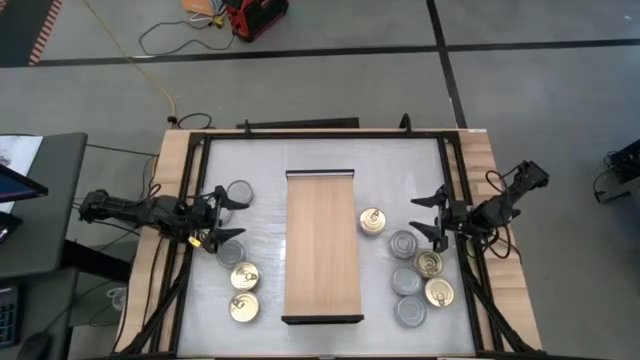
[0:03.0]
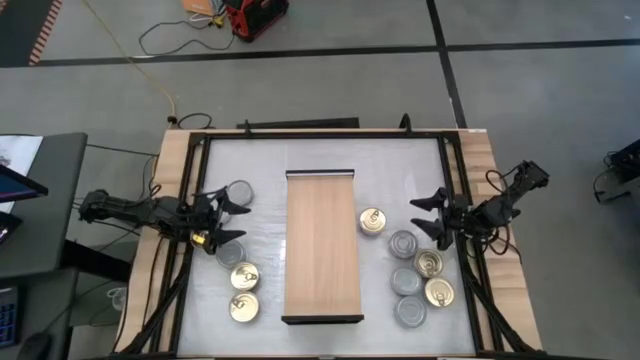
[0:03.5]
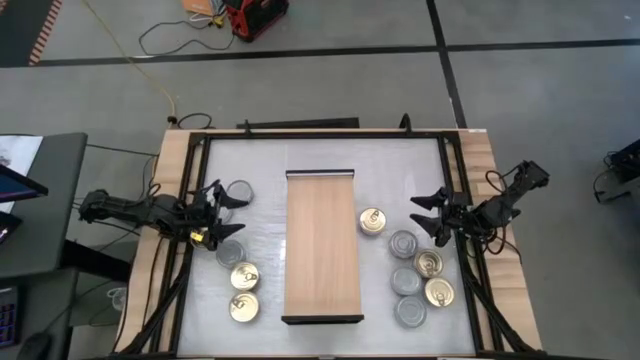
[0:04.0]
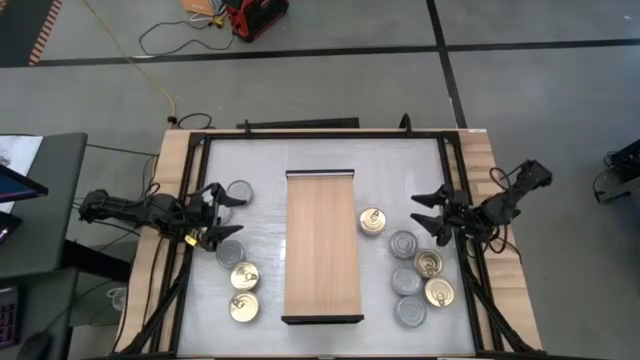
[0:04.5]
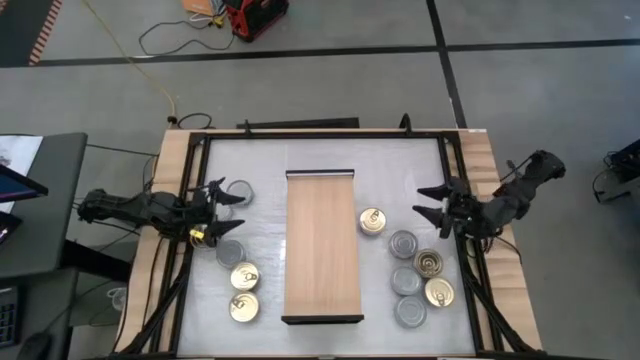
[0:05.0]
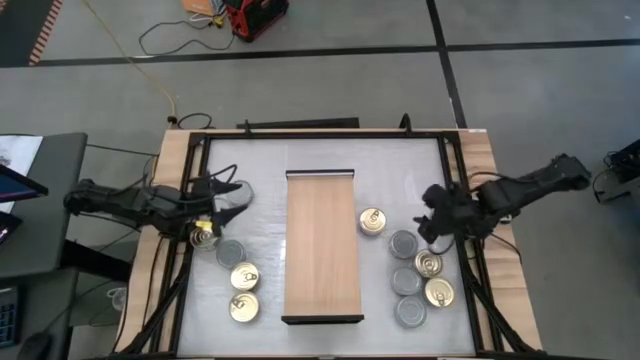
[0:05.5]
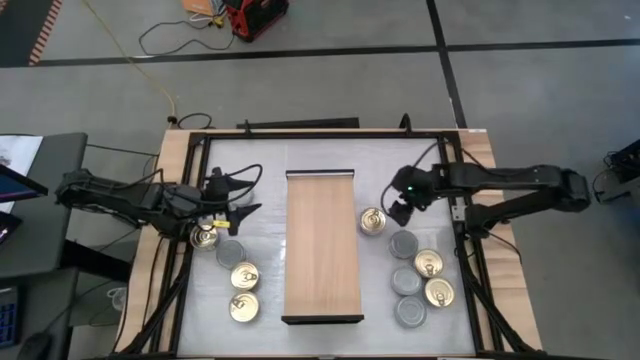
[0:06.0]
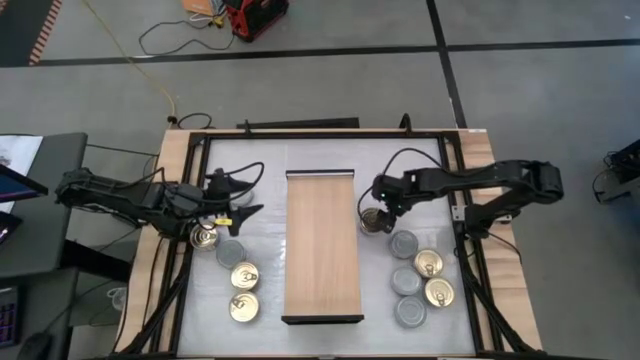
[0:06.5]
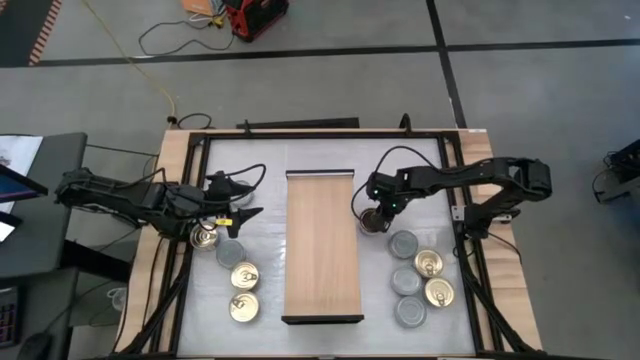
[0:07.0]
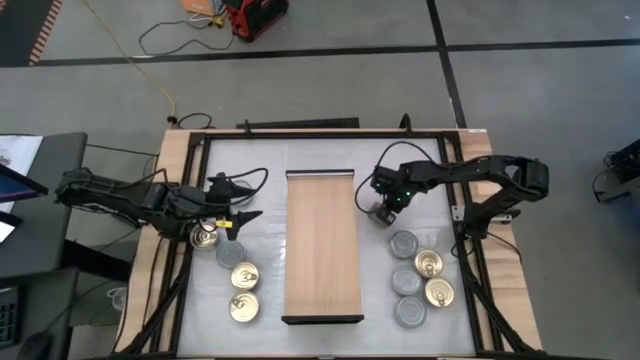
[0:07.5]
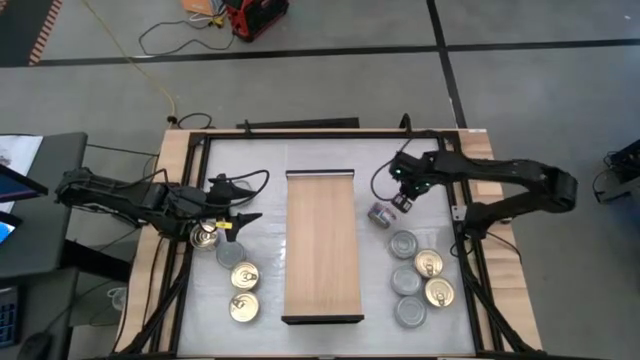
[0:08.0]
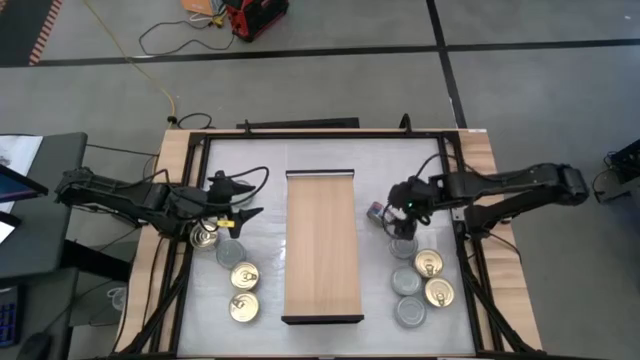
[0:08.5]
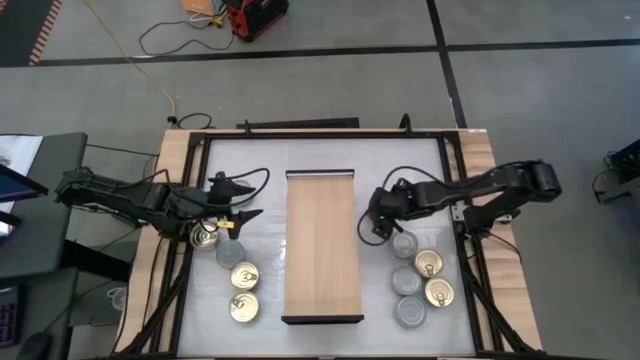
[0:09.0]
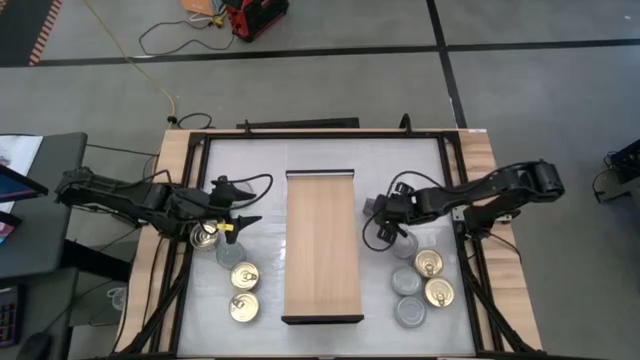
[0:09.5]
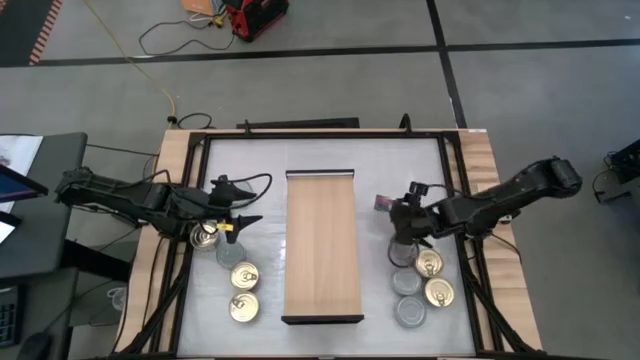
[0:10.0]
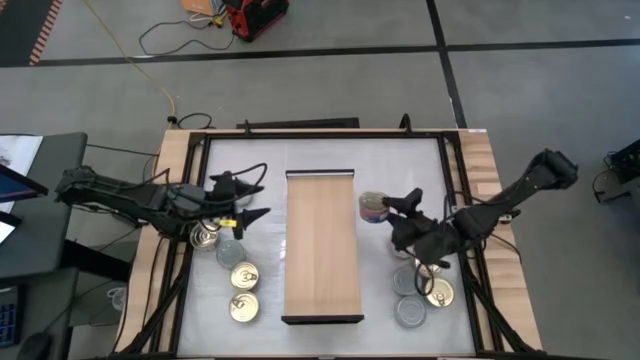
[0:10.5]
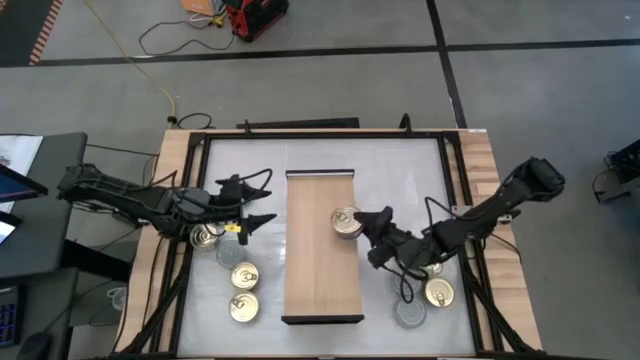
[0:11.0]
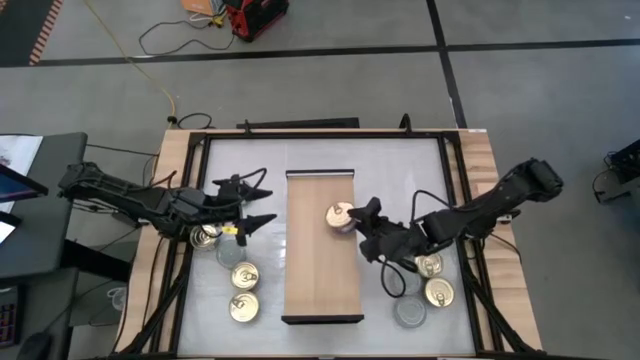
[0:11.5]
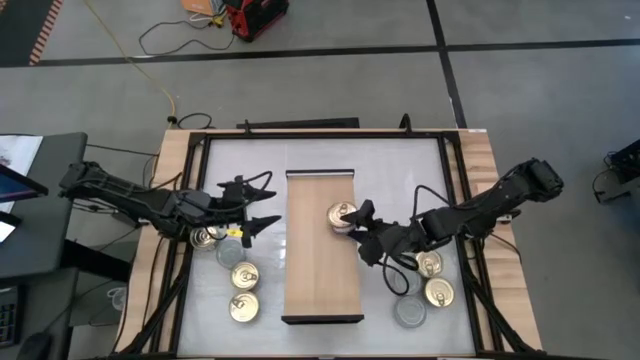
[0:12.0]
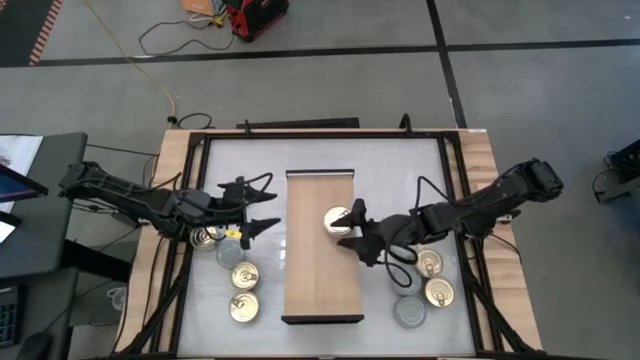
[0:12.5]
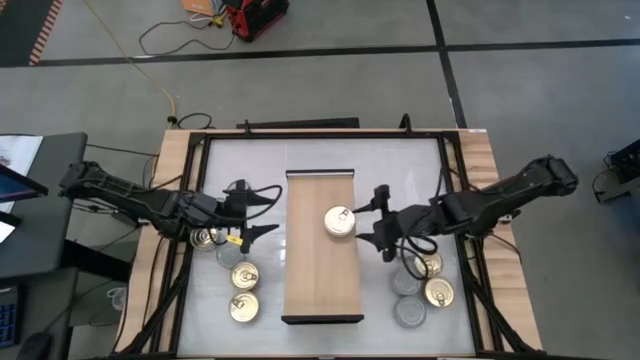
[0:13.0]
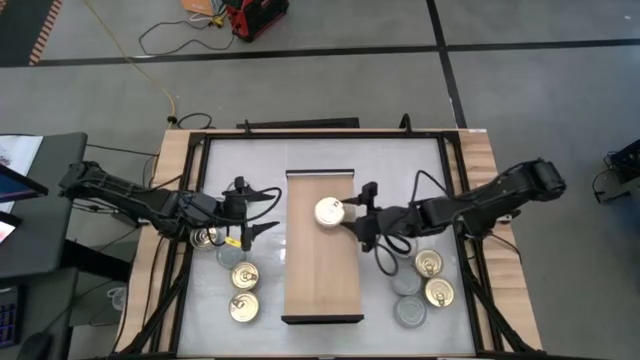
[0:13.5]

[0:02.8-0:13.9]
Task: Stack canned seafood by type on shelf
Put the blue tuna can on the shelf

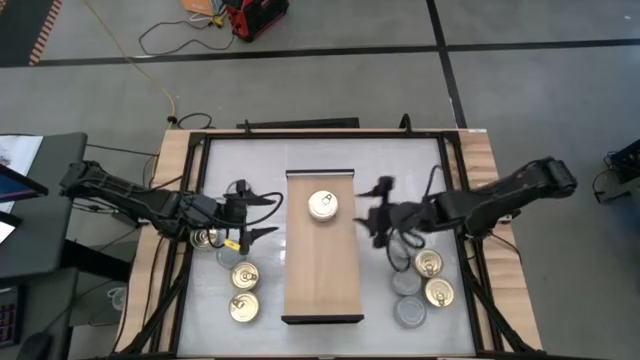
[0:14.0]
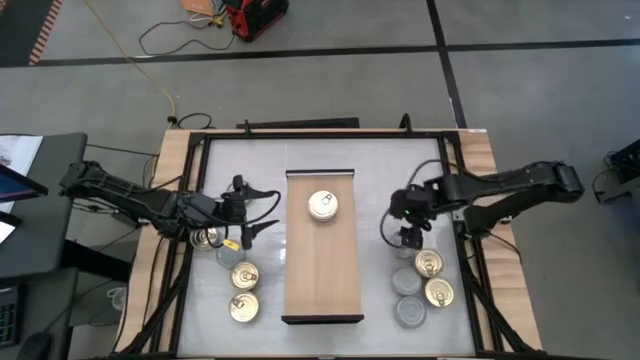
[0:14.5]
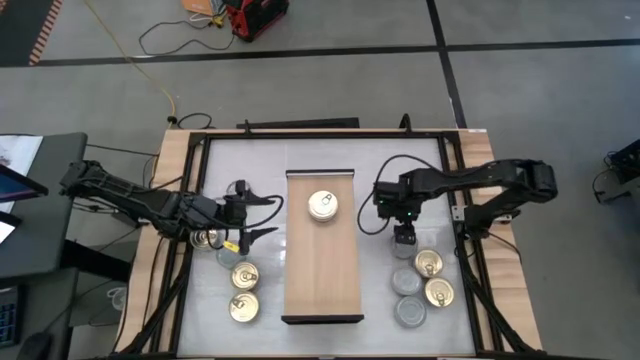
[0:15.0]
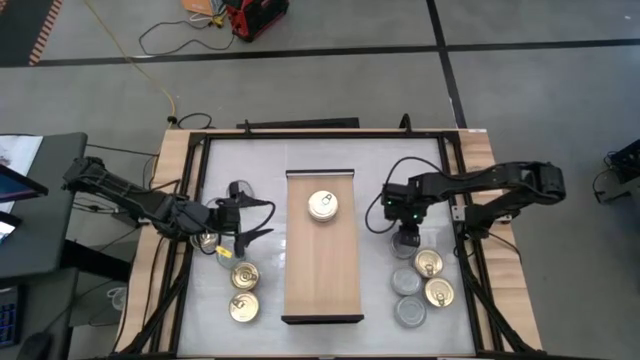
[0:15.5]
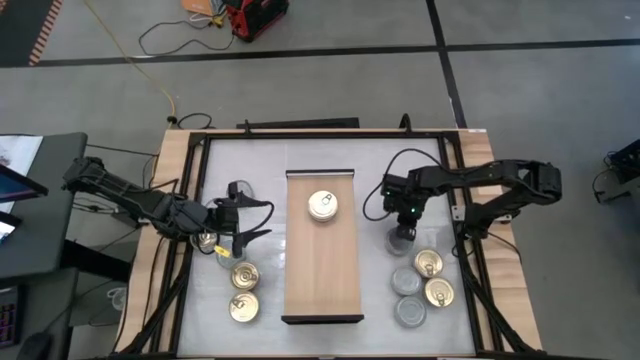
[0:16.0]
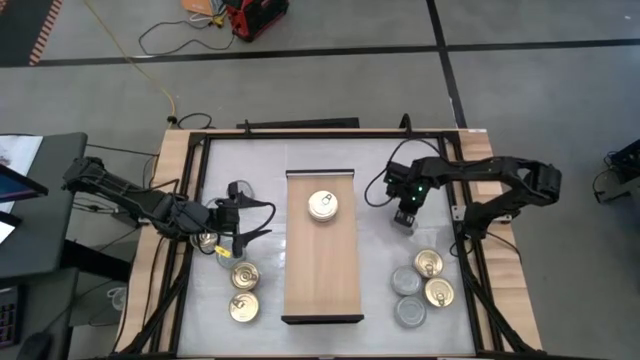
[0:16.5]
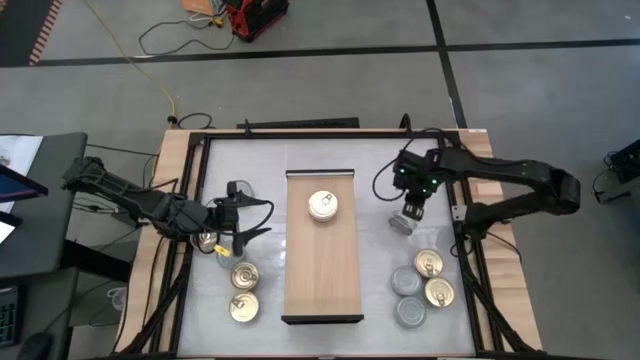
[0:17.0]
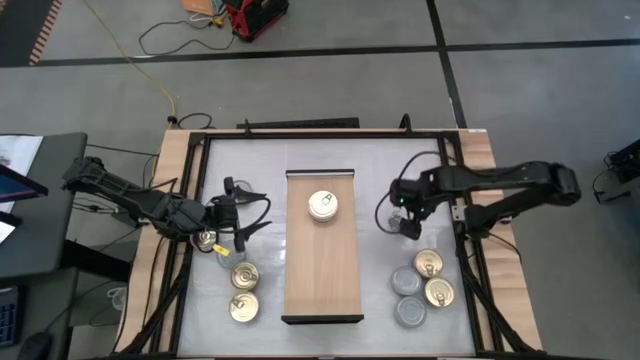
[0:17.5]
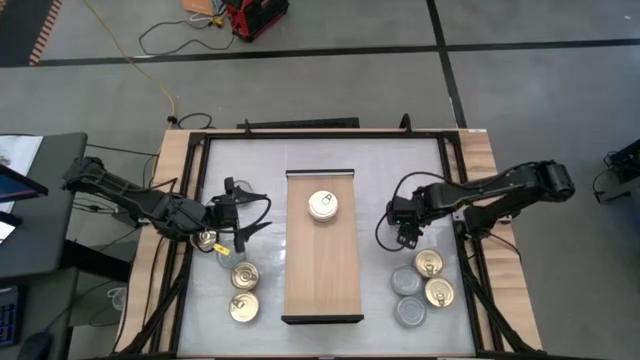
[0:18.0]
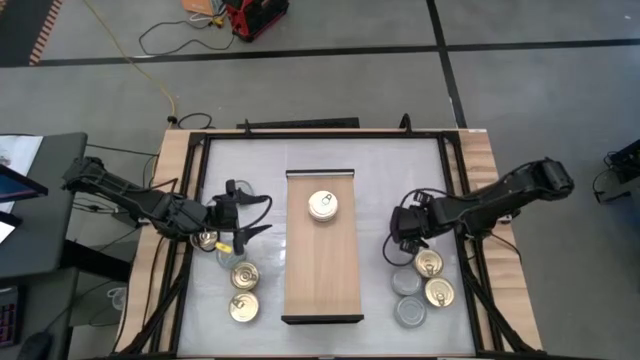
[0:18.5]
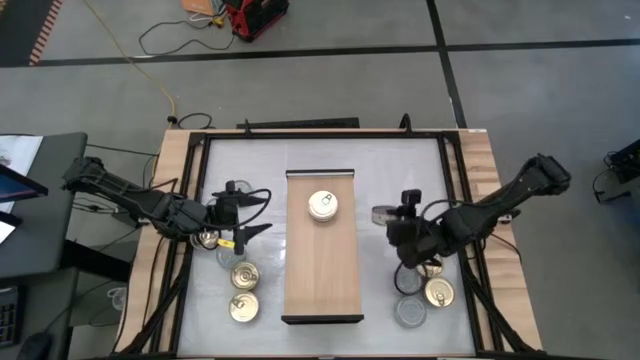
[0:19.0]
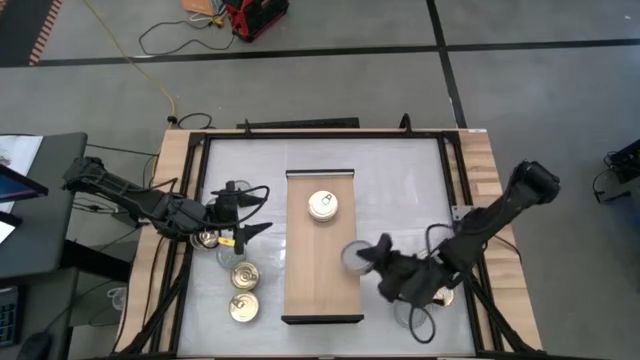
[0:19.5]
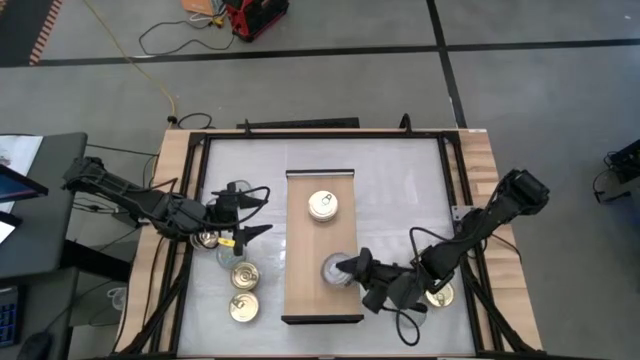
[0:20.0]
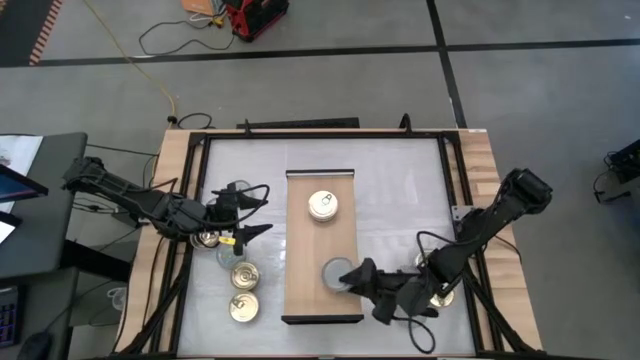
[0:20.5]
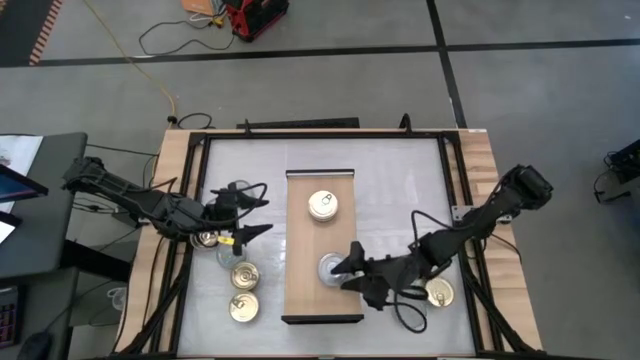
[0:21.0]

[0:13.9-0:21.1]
Put the green tuna can on the shelf

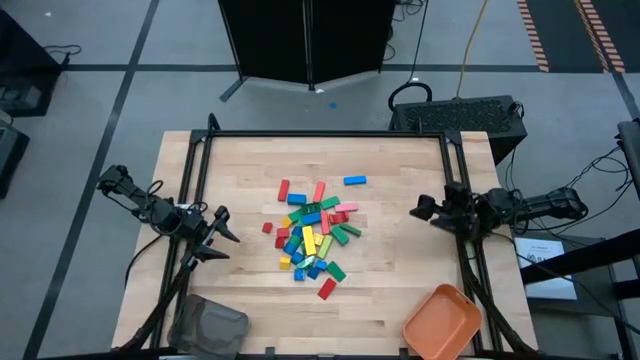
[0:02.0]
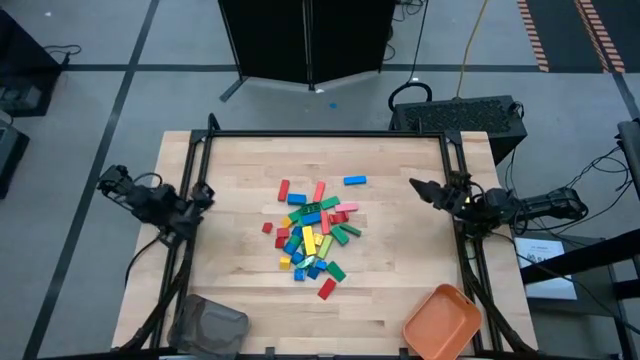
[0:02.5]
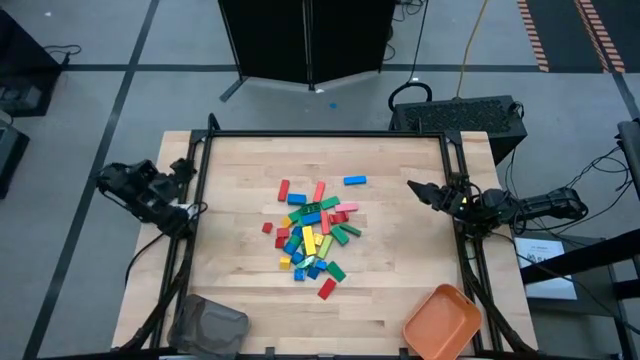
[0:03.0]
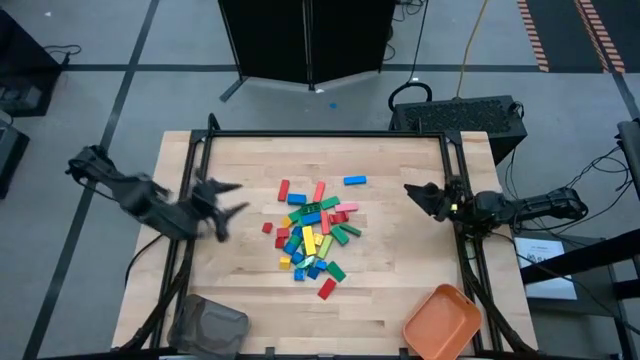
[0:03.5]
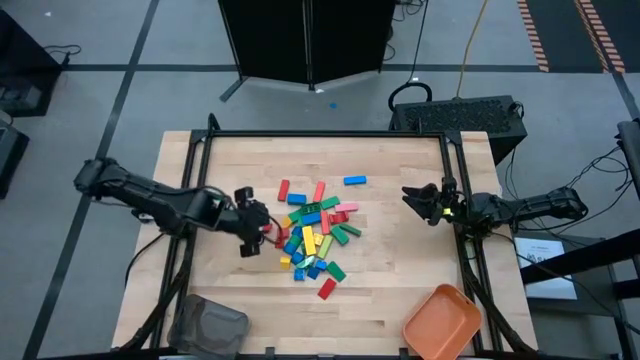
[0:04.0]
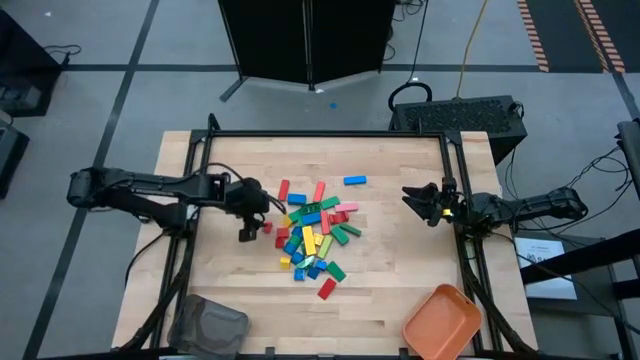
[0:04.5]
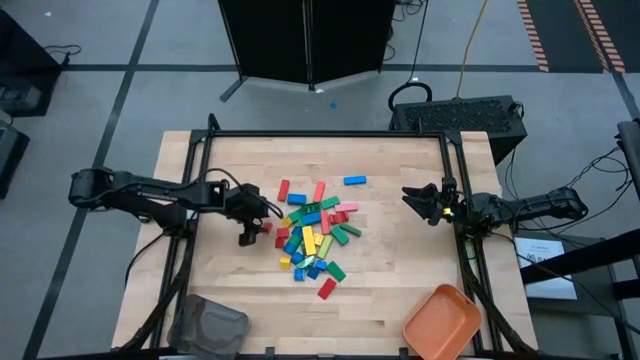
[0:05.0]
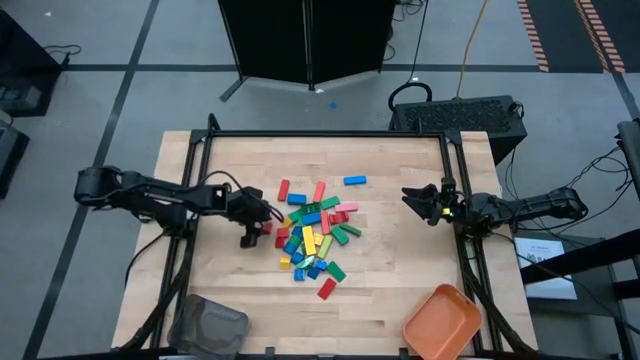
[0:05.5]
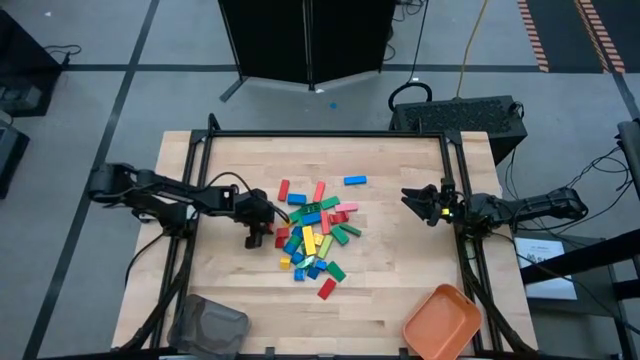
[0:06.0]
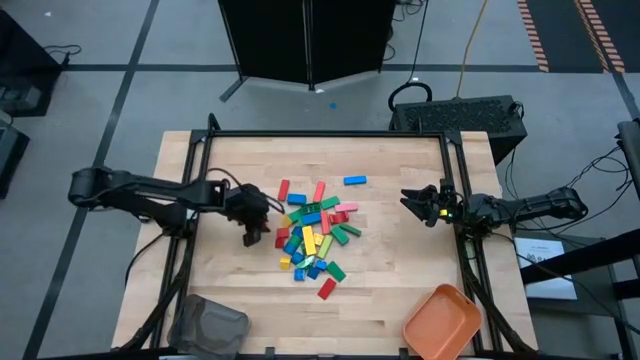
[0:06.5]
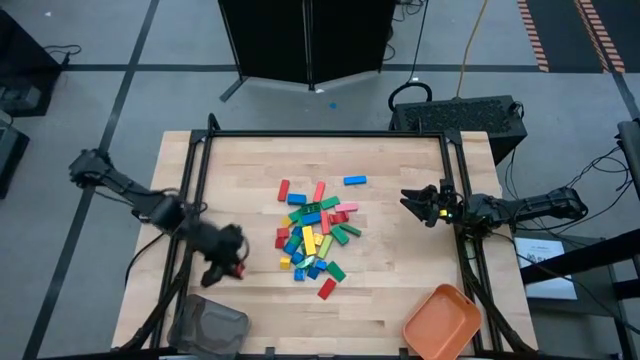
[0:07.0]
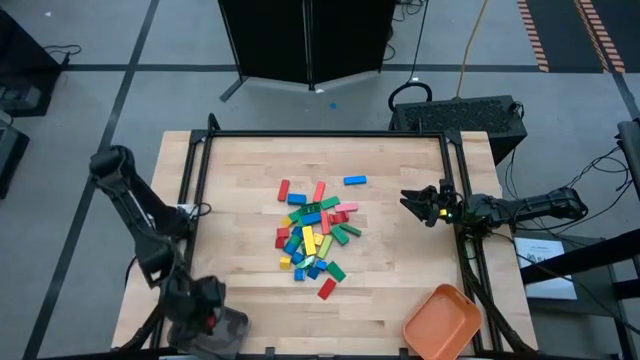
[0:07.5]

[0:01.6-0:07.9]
Task: Sort blocks by size
Put the red triangular block into the black bin
